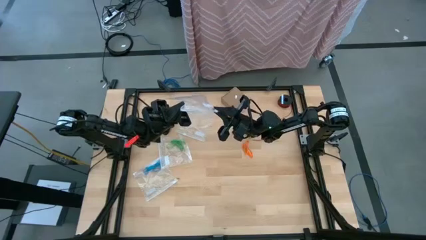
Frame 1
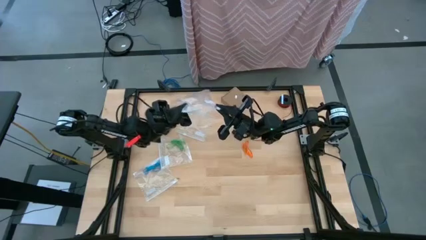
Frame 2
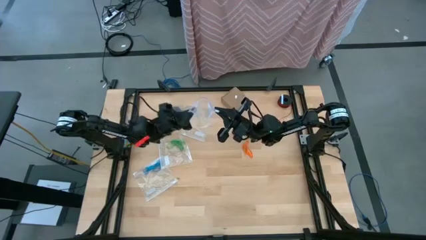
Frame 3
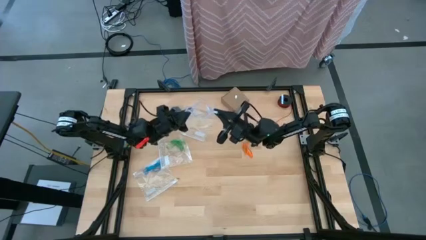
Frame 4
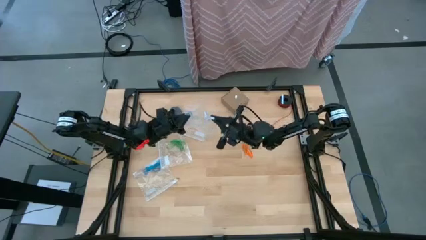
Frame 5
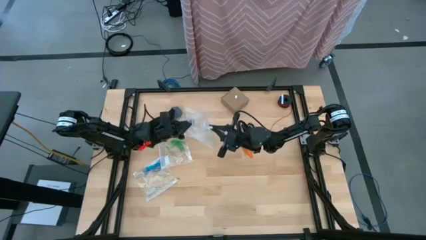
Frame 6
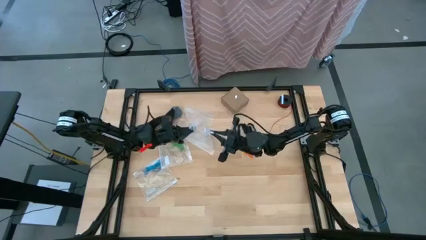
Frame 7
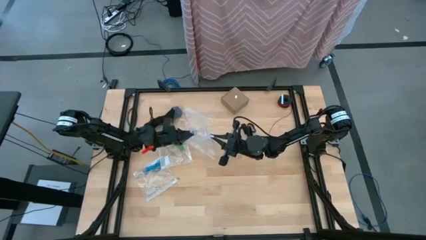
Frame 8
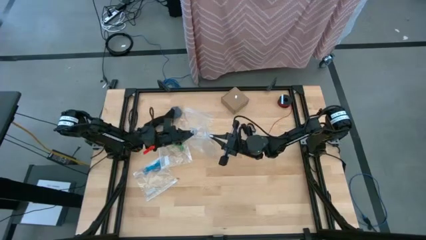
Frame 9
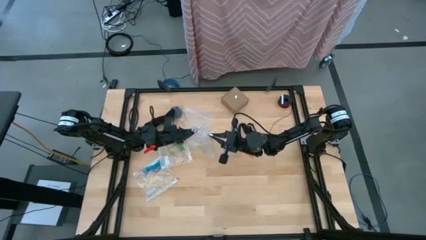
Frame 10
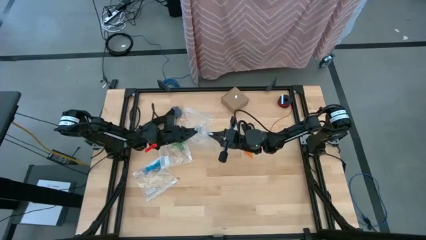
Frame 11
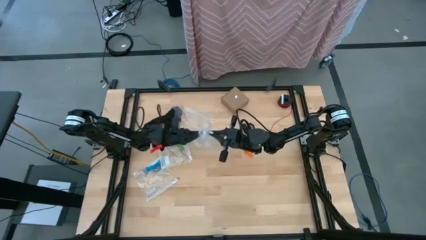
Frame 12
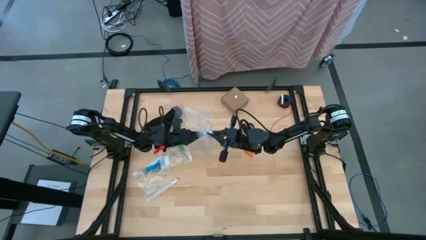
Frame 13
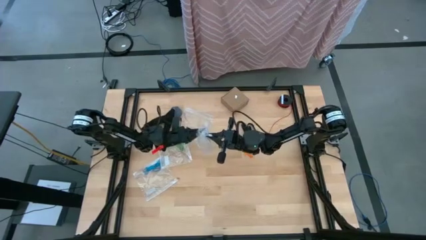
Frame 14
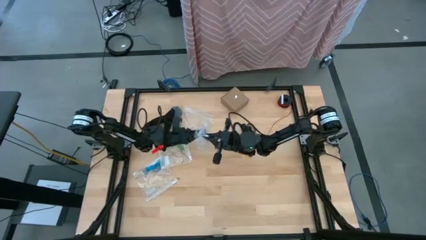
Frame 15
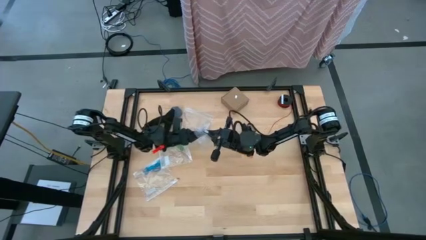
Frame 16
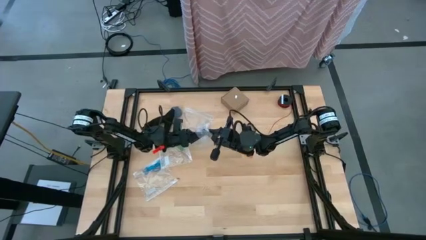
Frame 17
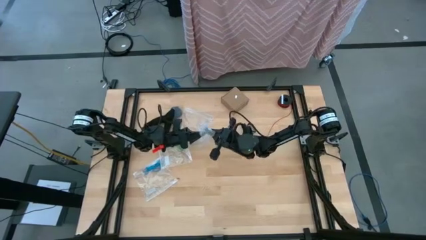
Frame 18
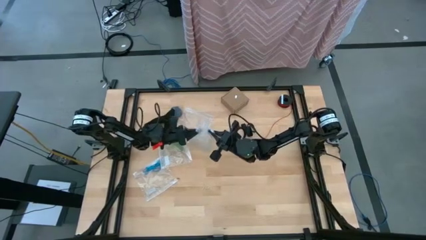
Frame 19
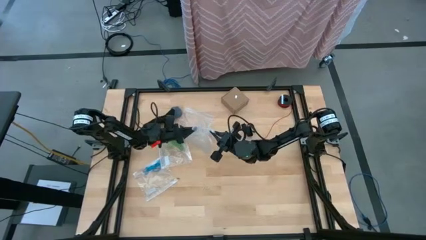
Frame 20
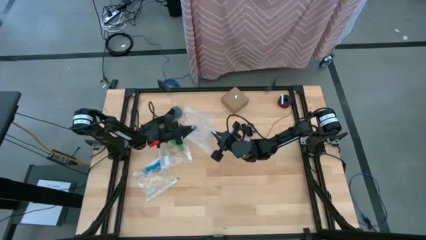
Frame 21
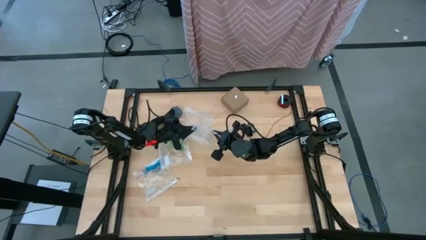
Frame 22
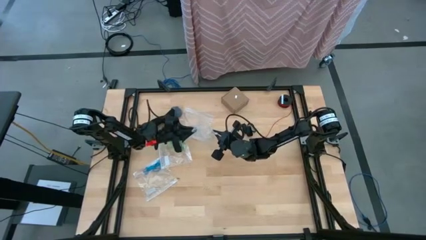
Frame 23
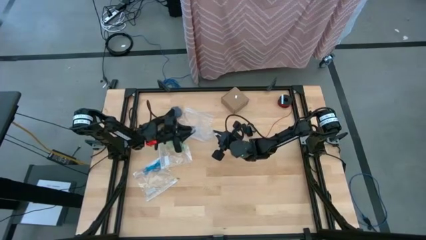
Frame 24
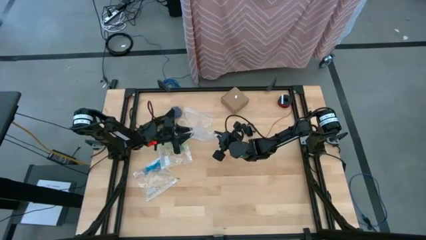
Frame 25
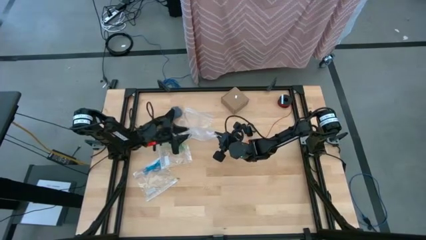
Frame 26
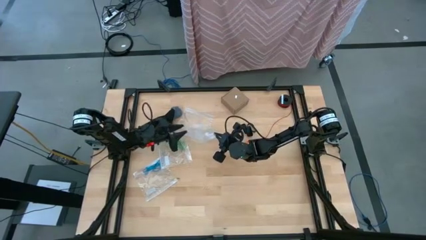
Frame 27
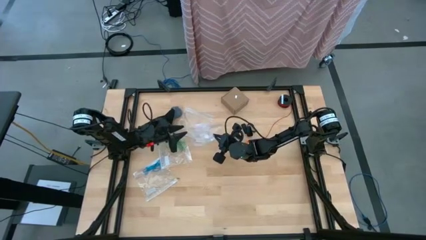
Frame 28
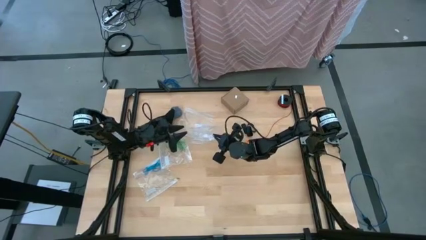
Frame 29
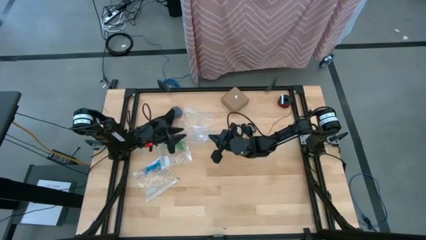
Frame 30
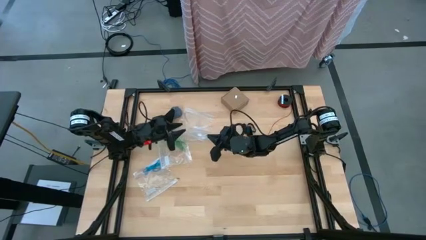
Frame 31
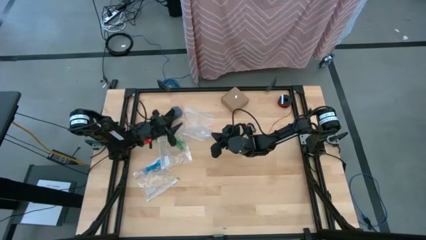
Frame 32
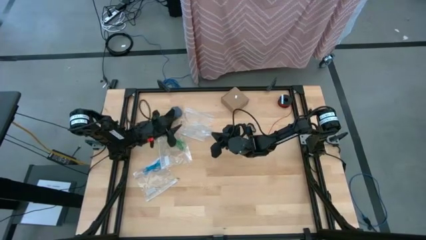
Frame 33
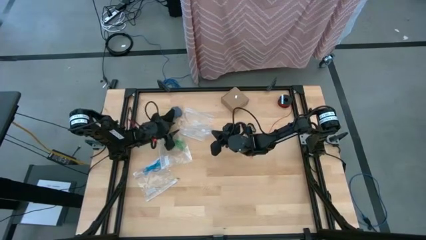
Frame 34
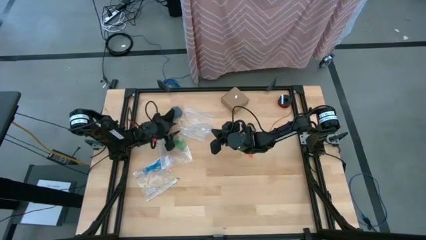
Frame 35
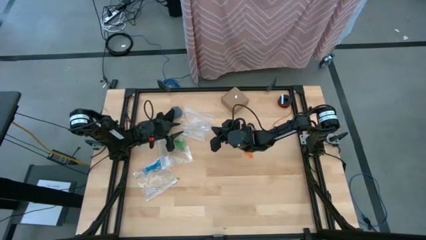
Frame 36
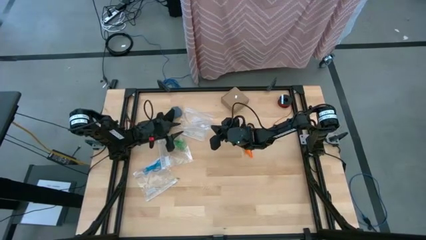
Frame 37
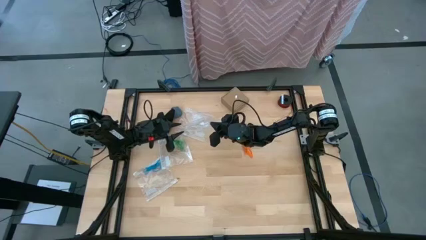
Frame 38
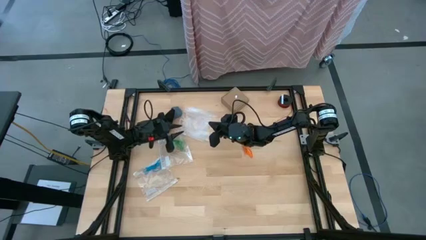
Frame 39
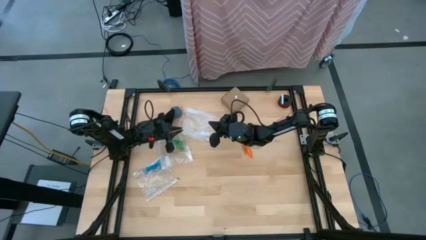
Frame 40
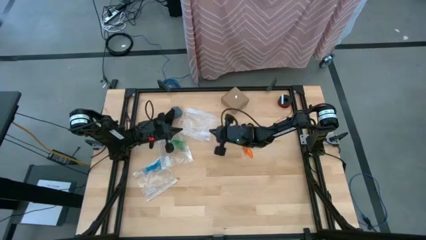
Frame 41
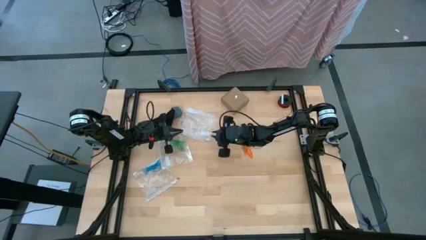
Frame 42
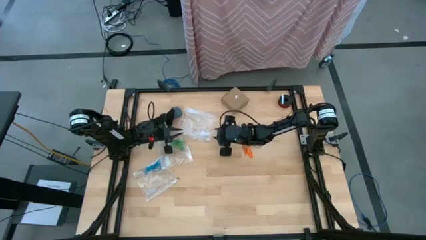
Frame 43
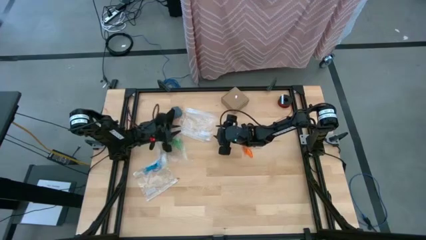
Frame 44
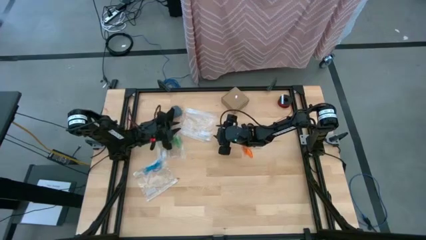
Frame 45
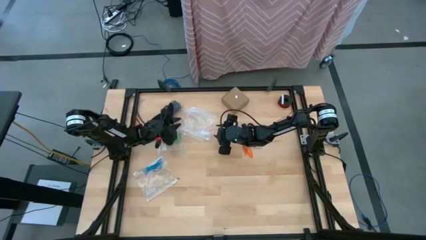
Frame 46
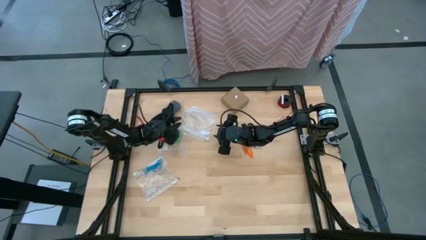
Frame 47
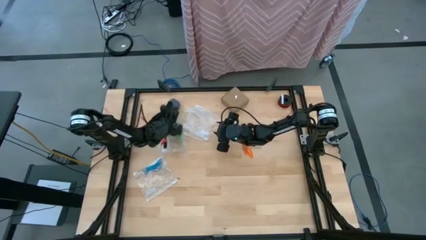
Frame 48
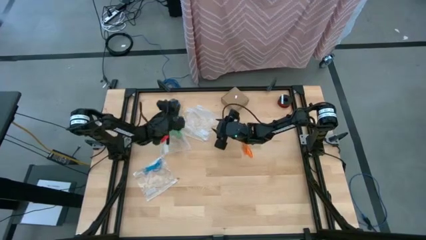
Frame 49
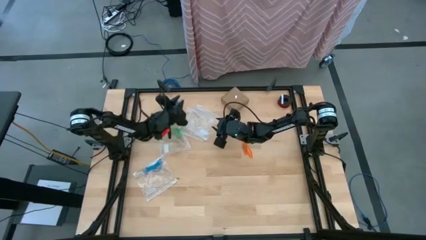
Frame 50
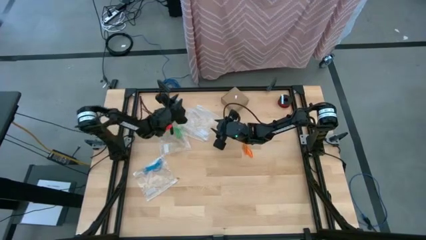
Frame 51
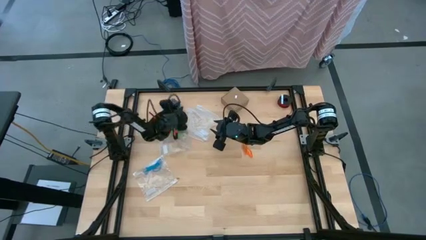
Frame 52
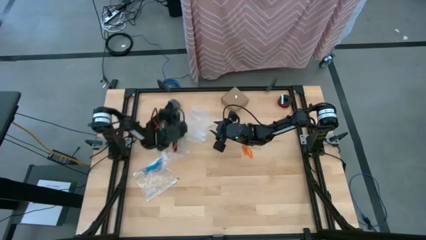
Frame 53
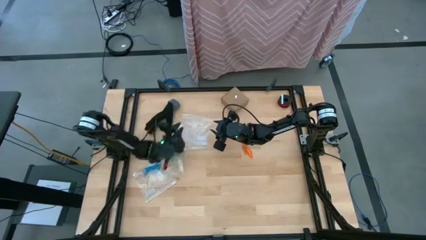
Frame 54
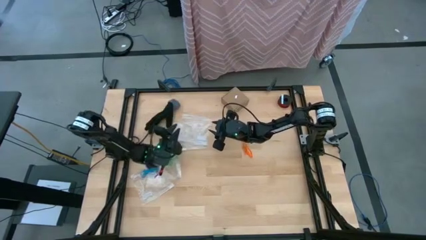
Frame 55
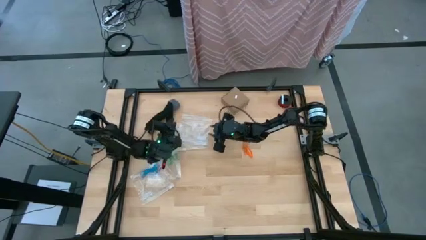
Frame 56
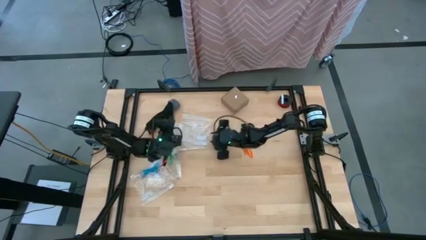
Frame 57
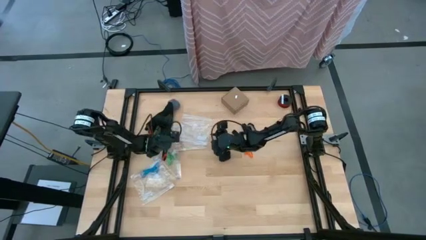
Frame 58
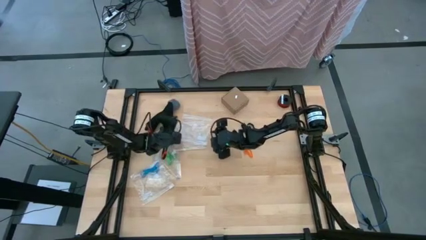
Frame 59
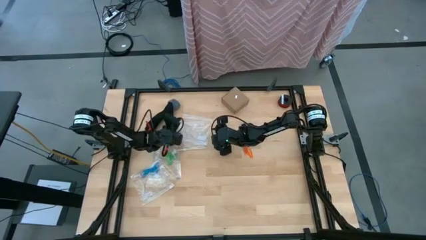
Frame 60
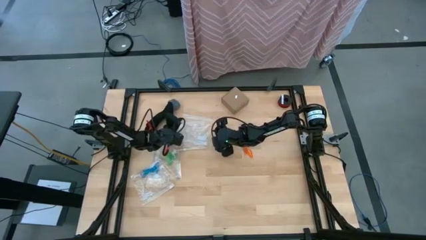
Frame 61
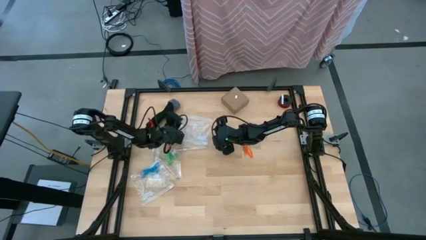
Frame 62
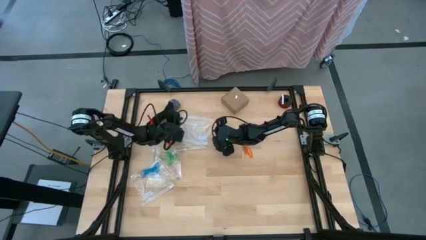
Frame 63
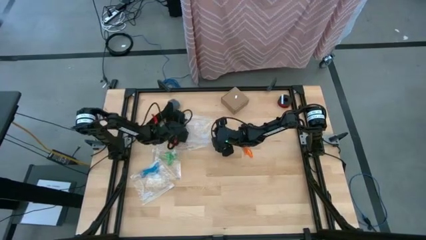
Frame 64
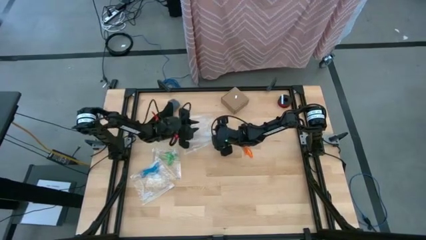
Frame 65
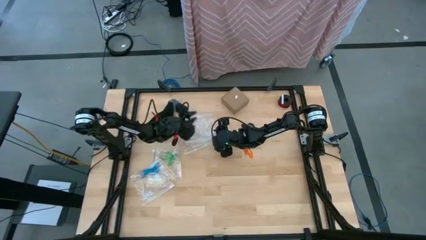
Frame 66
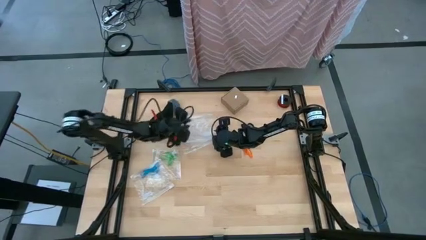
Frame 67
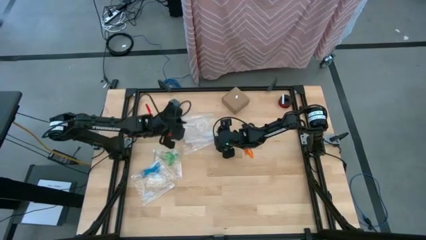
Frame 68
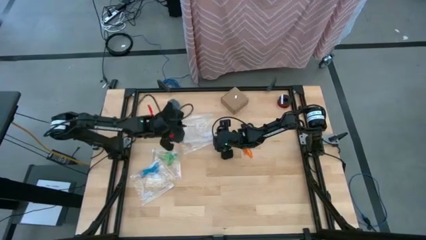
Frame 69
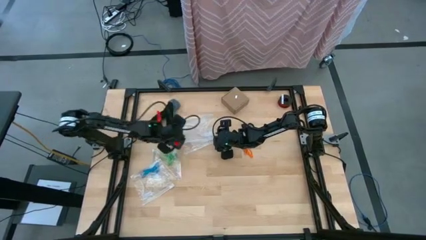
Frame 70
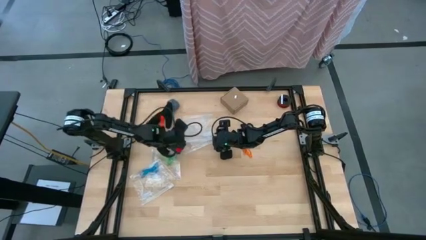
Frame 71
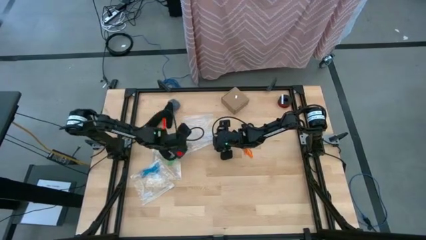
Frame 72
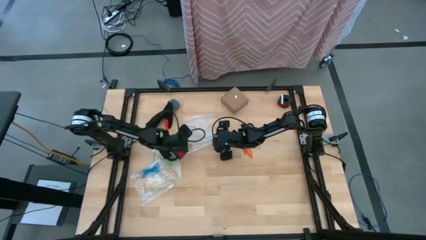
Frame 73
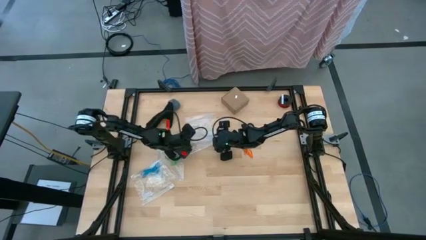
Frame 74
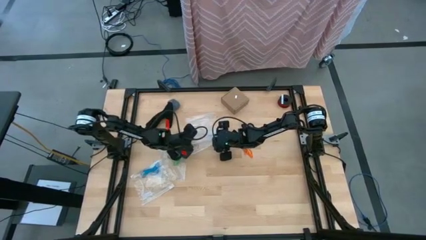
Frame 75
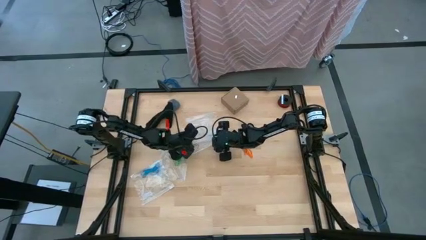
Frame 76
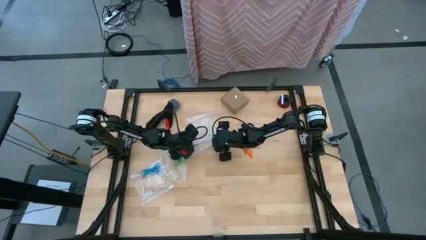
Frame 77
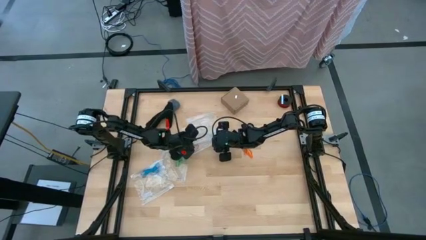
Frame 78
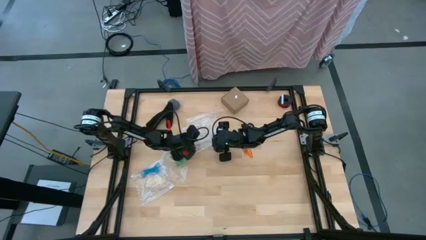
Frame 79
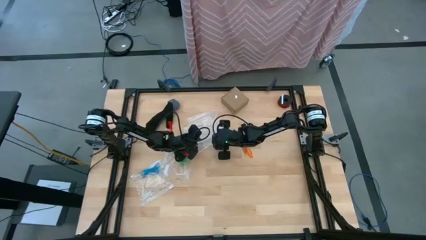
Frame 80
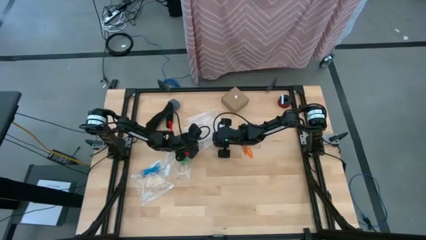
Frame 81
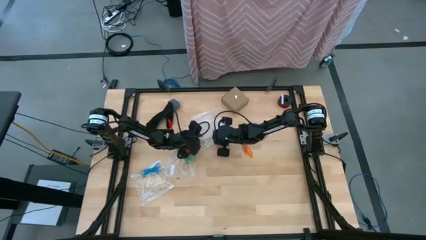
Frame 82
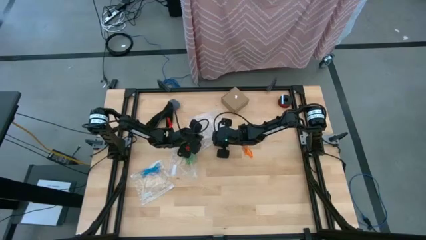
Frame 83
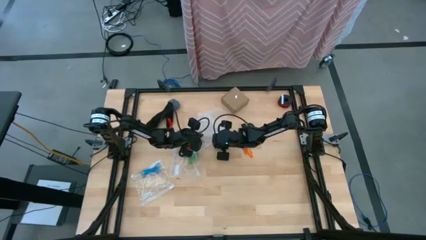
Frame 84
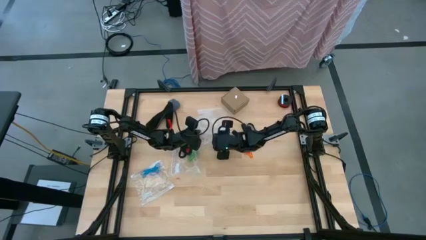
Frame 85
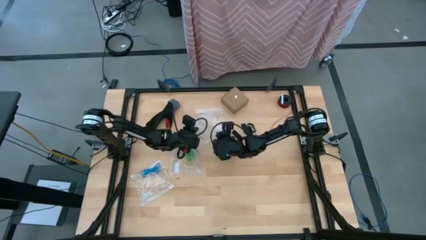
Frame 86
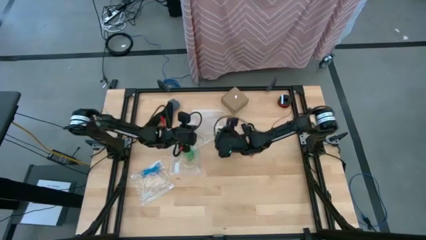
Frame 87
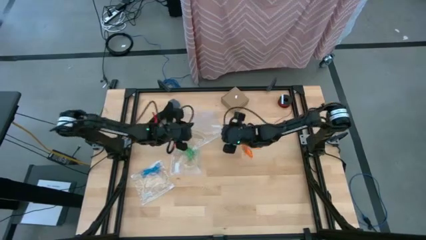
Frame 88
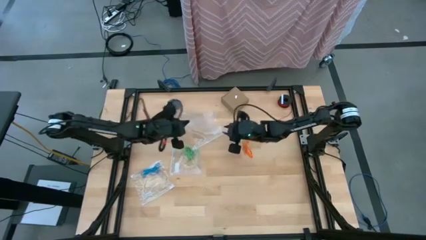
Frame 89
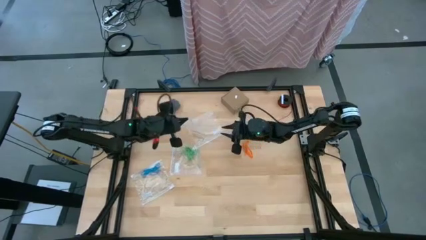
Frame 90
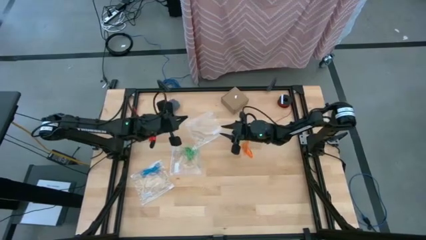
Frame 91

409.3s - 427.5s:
Task: Sort rubber bands
Open the transparent zip bag
